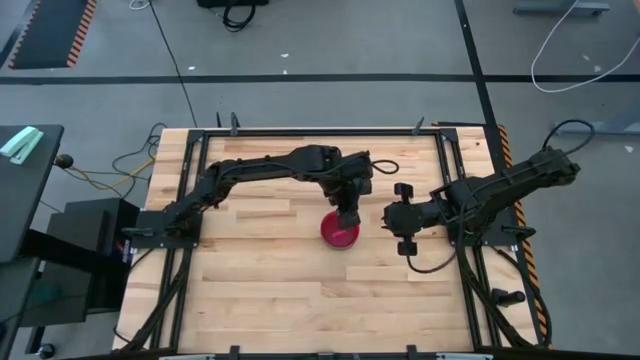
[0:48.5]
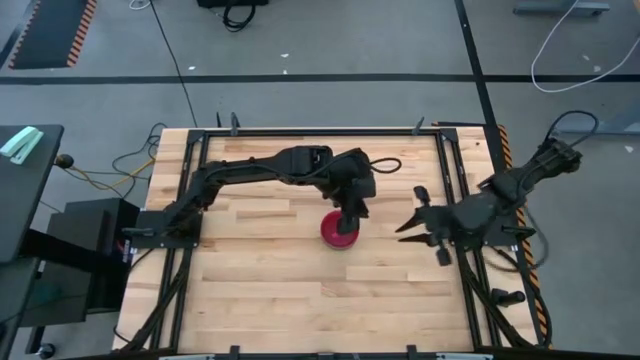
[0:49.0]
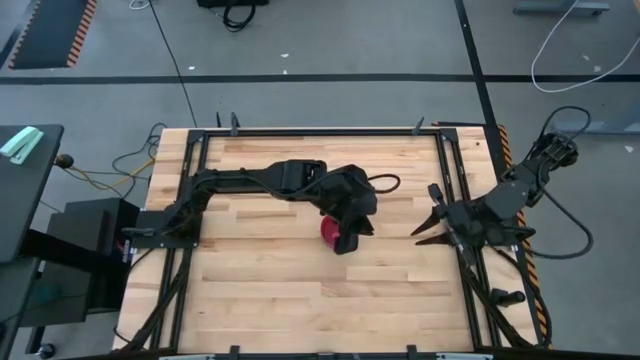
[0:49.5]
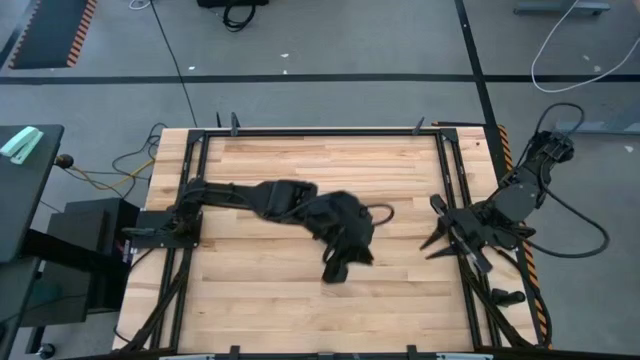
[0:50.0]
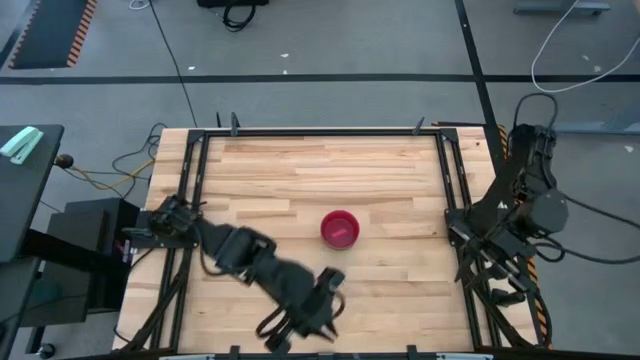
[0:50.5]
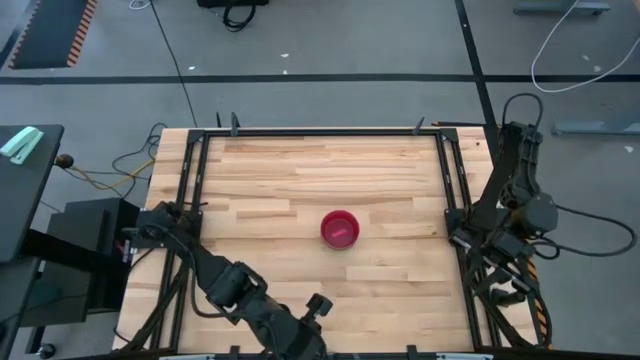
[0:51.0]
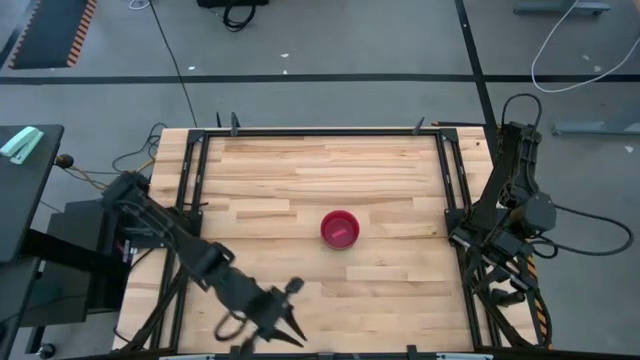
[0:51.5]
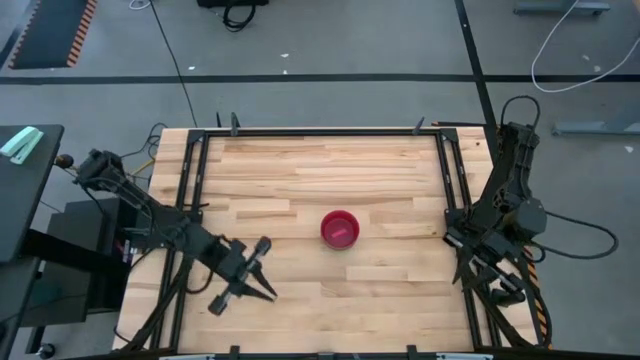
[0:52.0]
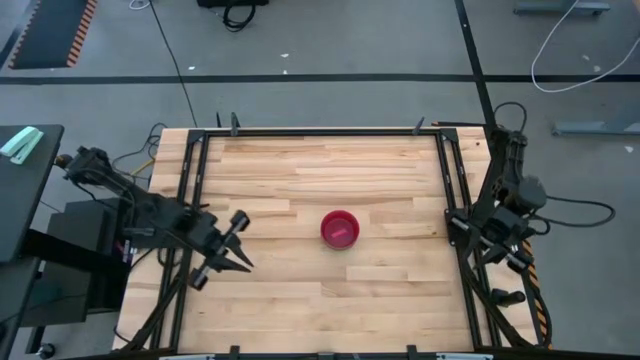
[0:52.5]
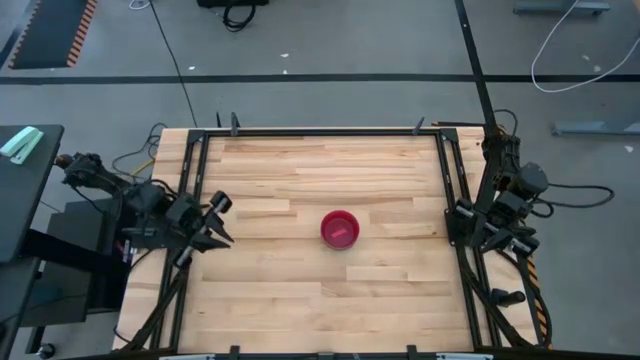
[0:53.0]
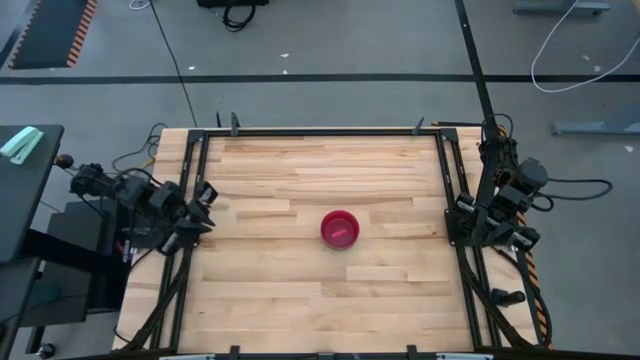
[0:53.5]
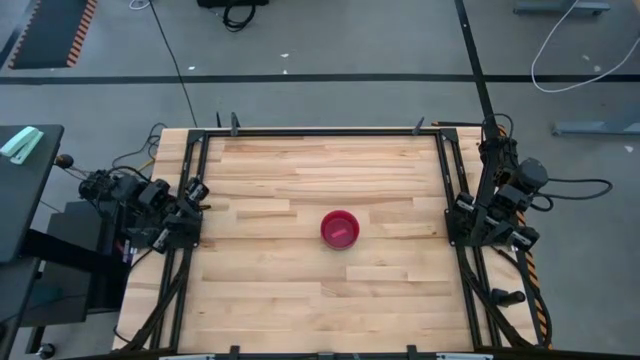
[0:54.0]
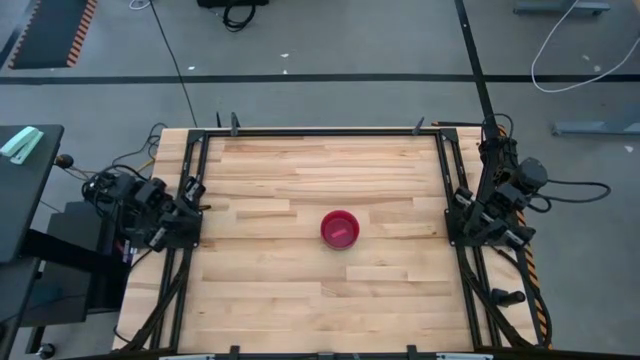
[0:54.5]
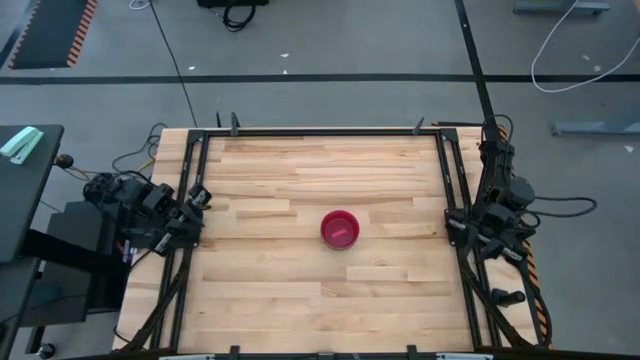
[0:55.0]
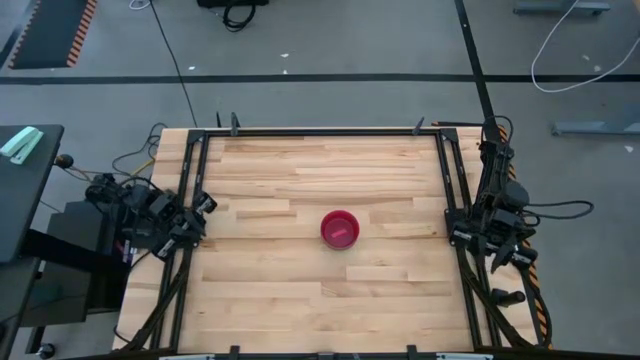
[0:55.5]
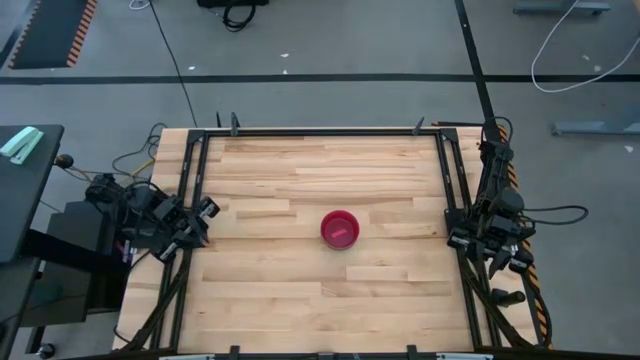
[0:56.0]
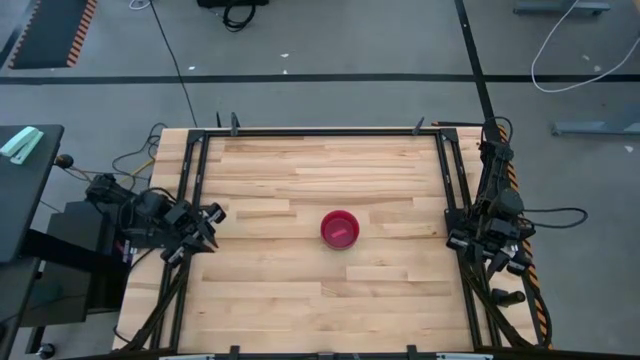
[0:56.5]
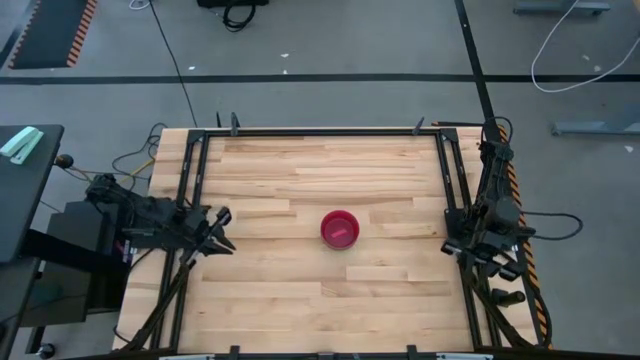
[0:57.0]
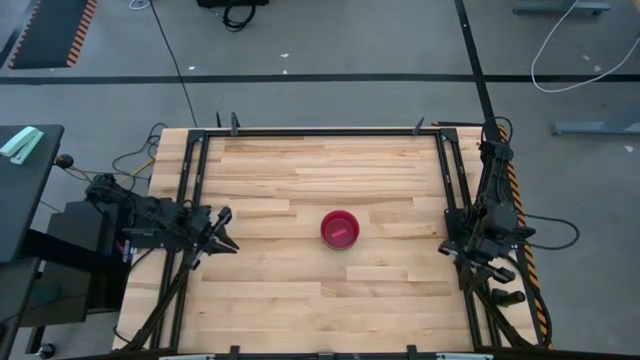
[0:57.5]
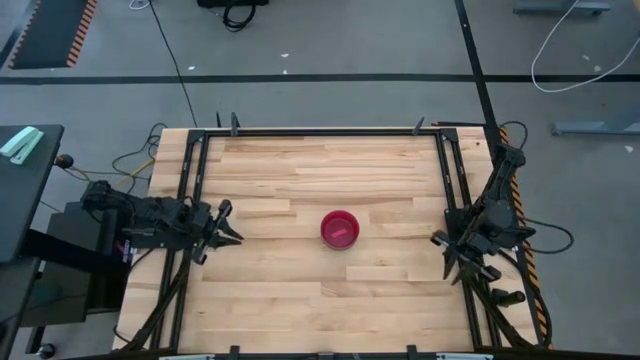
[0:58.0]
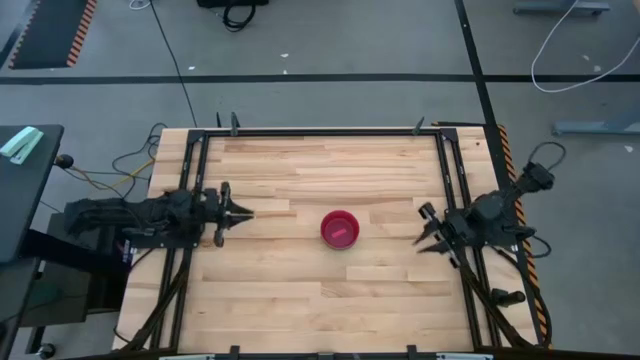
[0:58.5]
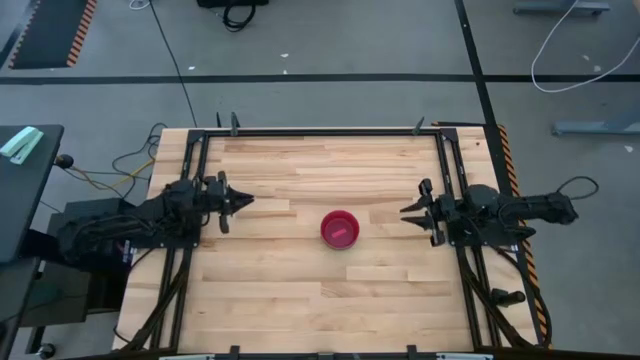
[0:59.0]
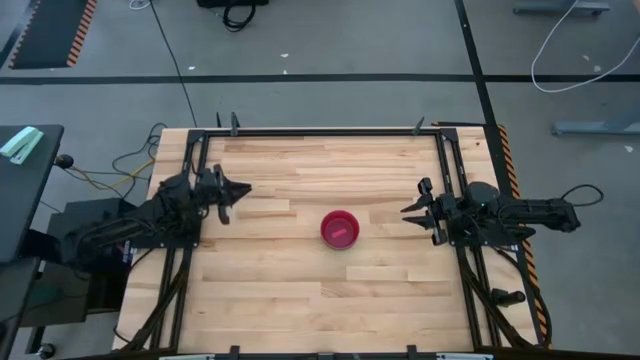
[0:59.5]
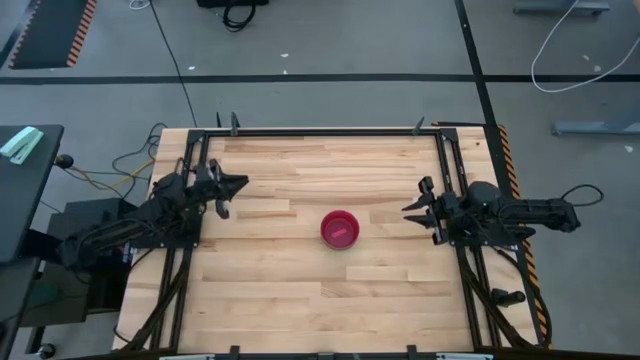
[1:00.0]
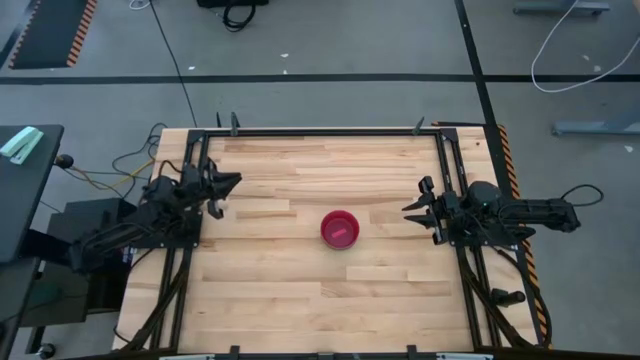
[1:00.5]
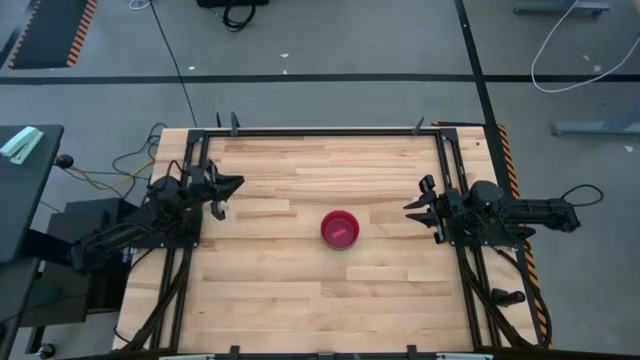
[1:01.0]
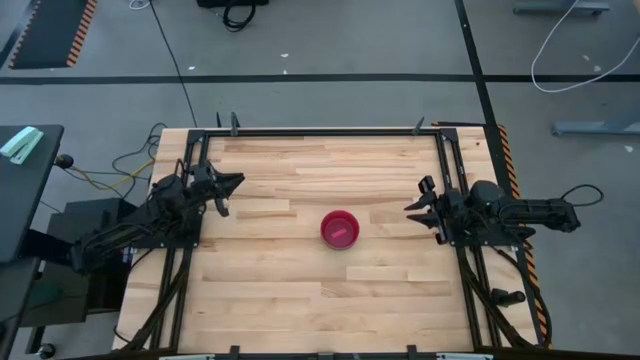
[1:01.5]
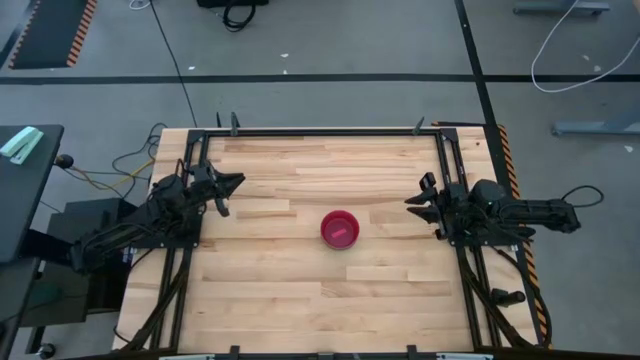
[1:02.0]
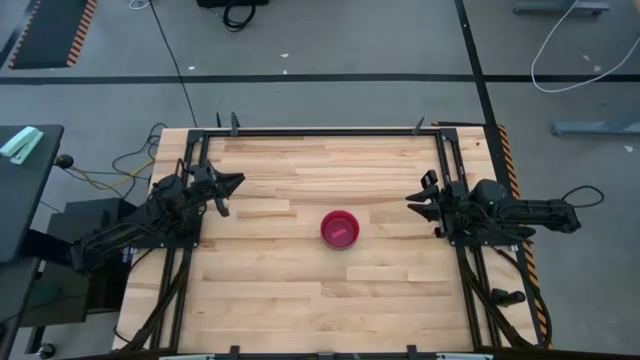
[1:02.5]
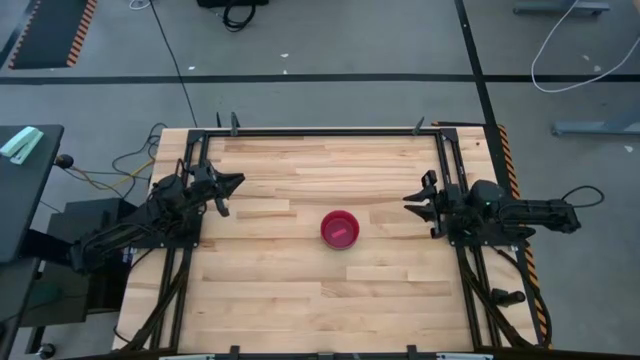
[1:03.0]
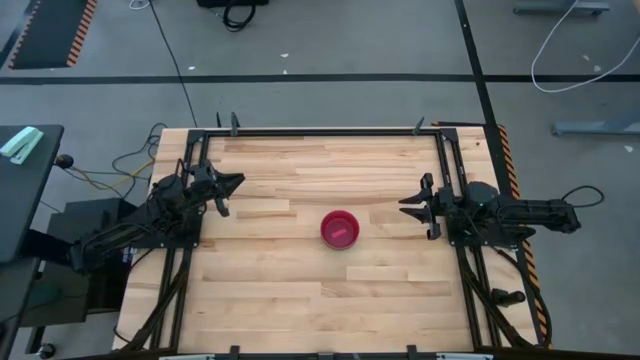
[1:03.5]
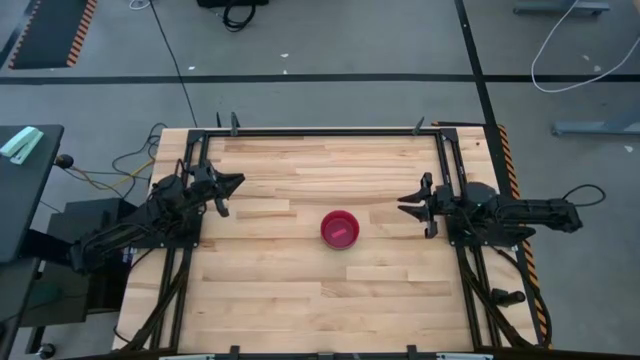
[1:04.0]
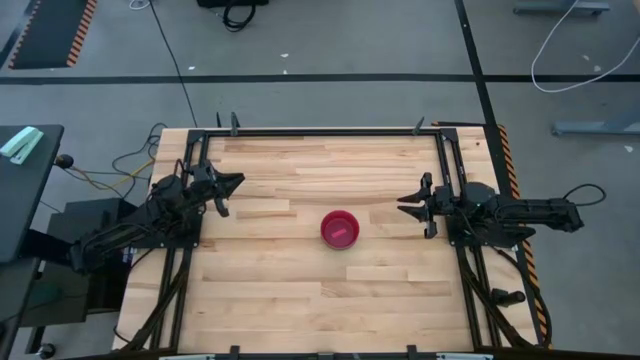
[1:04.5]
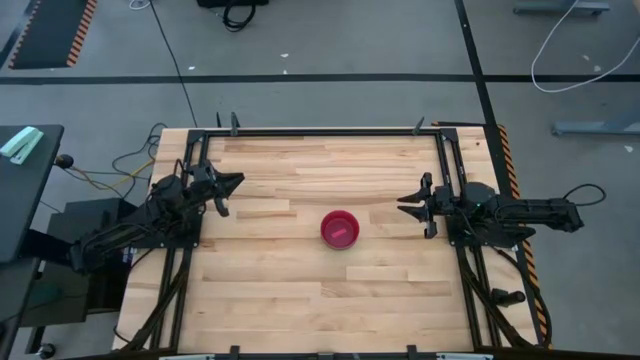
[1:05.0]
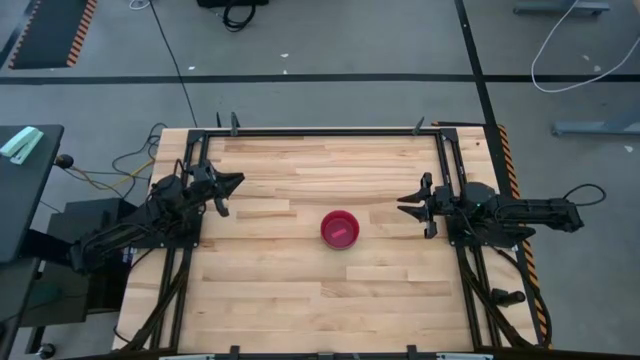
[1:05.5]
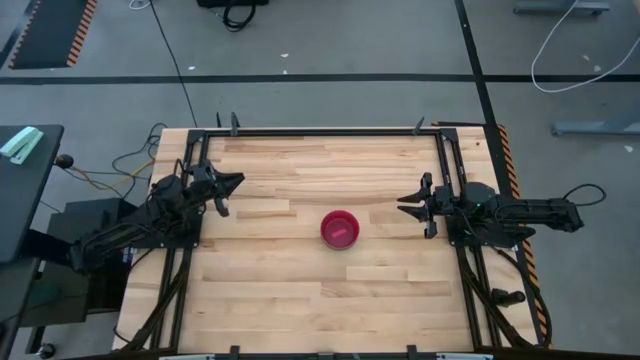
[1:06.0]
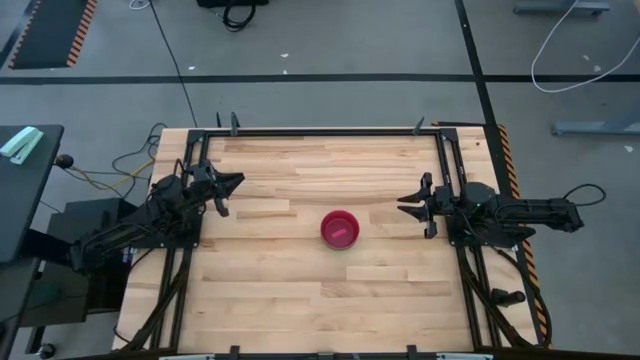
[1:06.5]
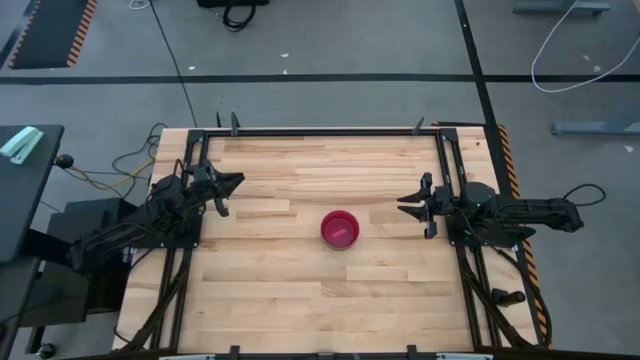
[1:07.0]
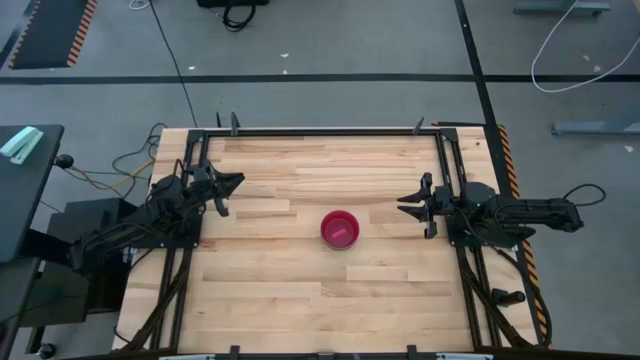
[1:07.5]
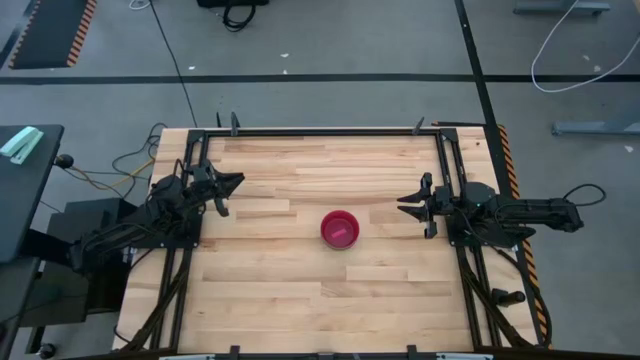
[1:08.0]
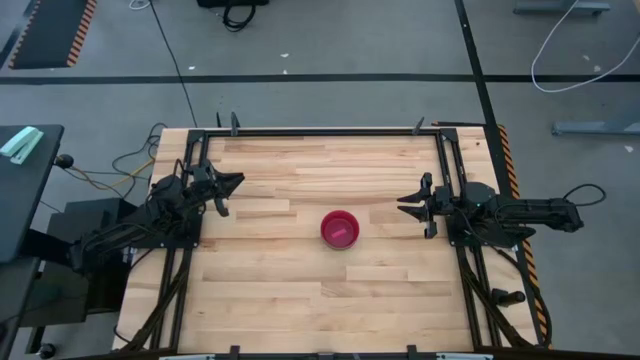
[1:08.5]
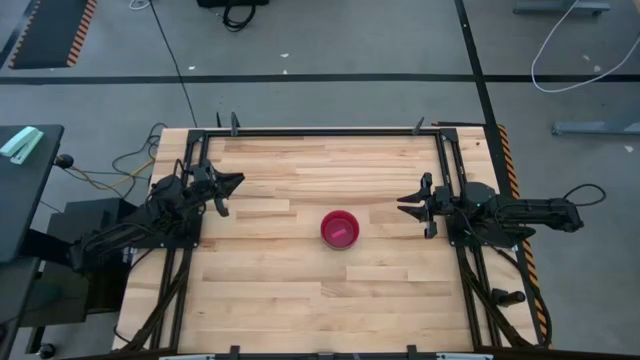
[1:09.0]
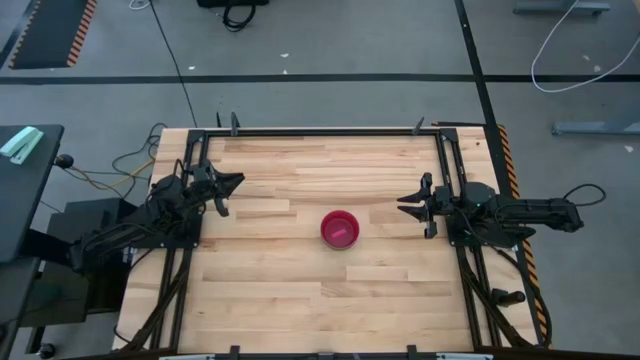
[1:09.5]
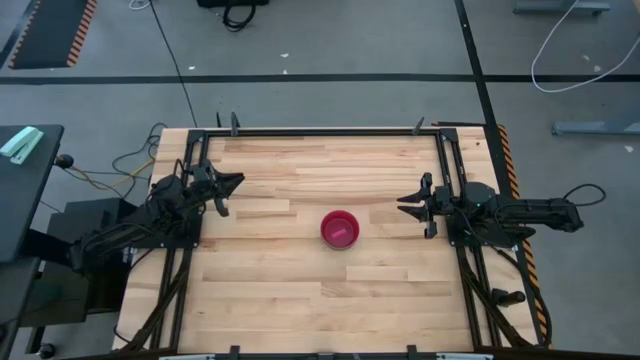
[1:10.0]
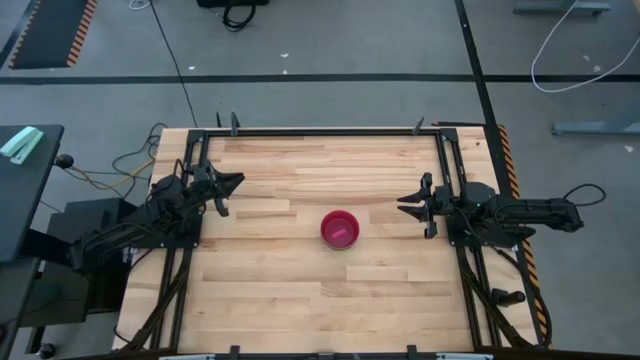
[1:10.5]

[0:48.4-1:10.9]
Task: Nest bowls inside each other
Return to home position
